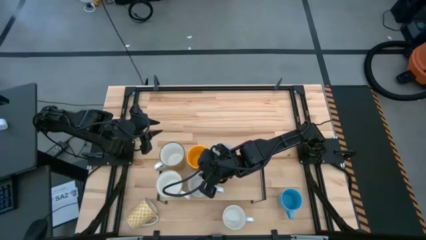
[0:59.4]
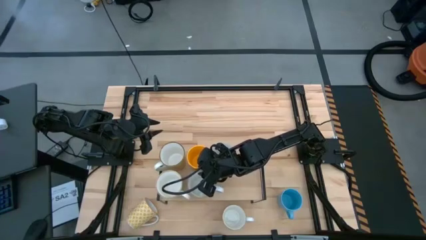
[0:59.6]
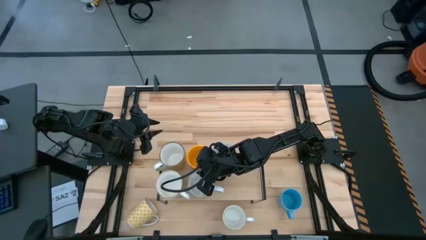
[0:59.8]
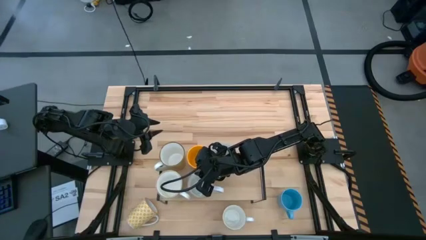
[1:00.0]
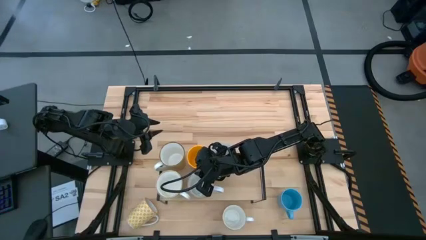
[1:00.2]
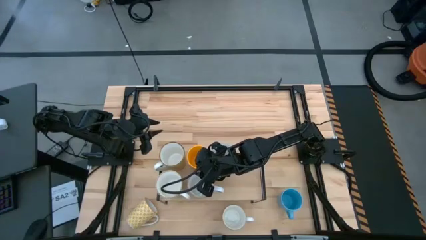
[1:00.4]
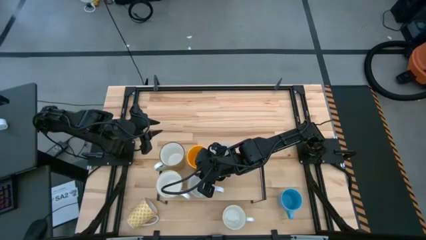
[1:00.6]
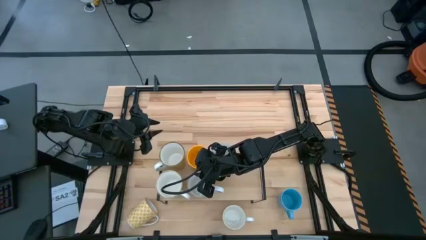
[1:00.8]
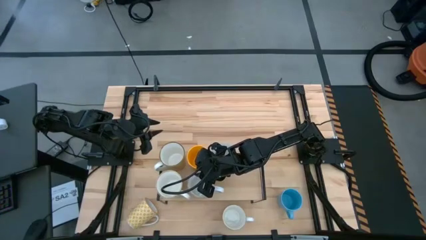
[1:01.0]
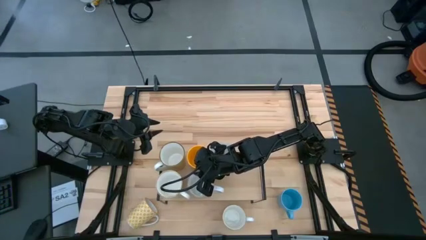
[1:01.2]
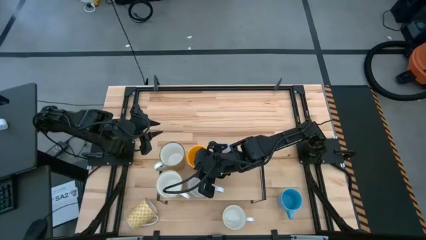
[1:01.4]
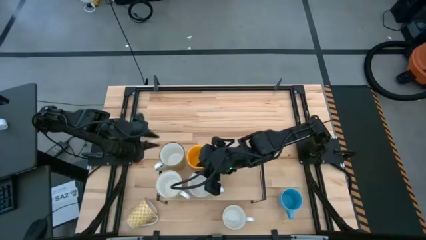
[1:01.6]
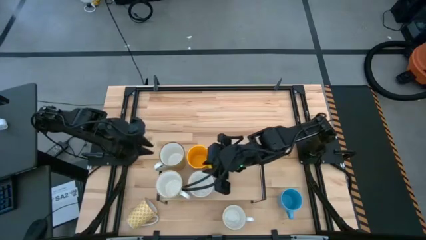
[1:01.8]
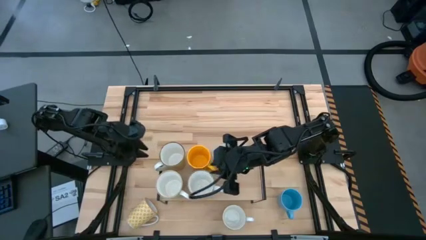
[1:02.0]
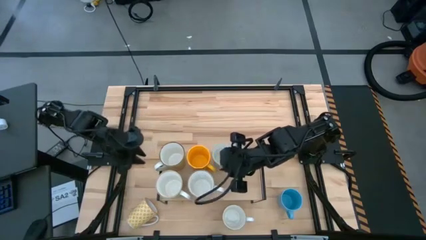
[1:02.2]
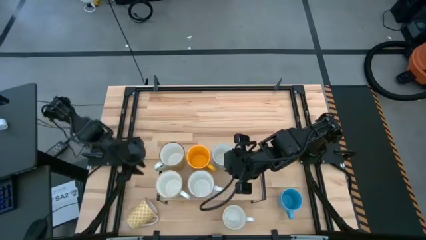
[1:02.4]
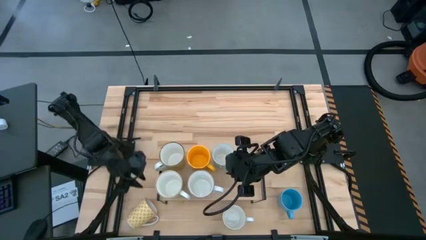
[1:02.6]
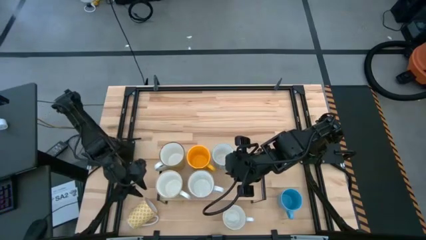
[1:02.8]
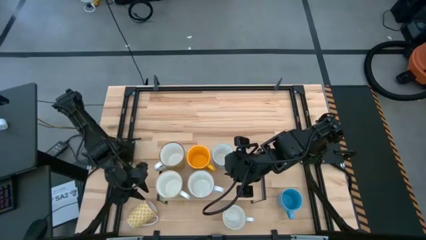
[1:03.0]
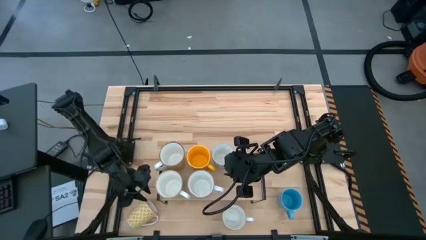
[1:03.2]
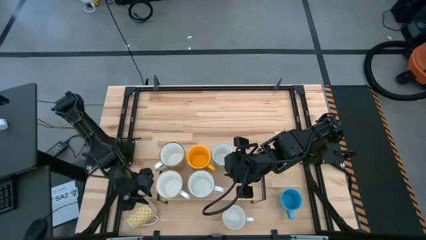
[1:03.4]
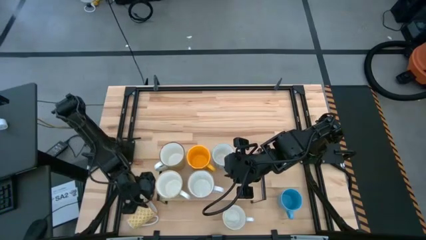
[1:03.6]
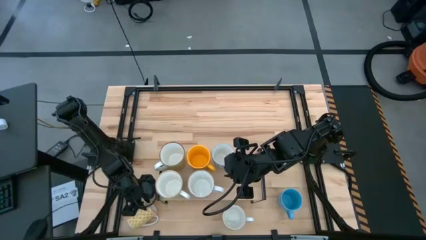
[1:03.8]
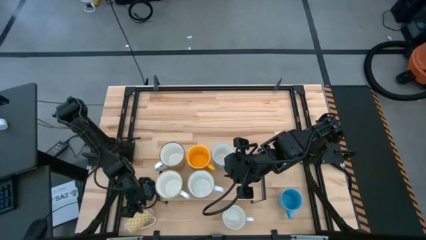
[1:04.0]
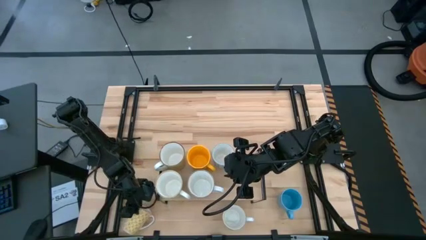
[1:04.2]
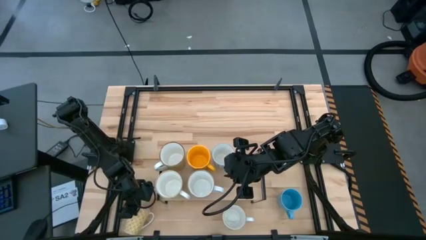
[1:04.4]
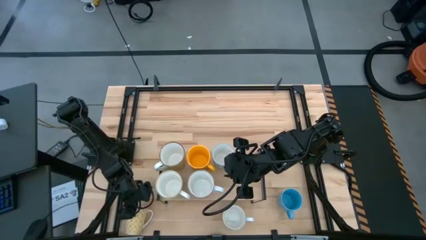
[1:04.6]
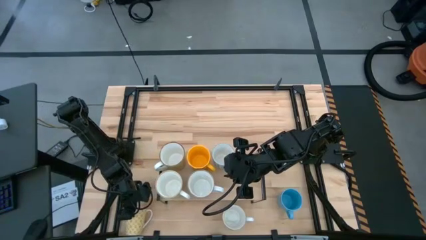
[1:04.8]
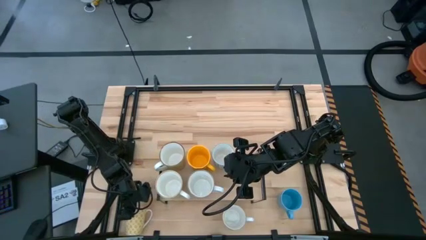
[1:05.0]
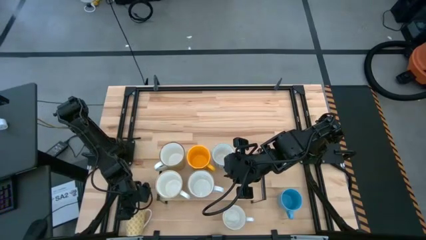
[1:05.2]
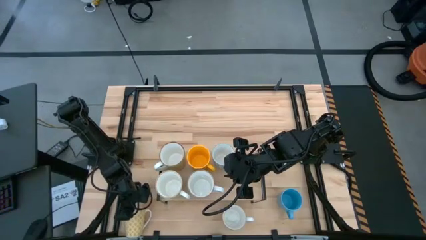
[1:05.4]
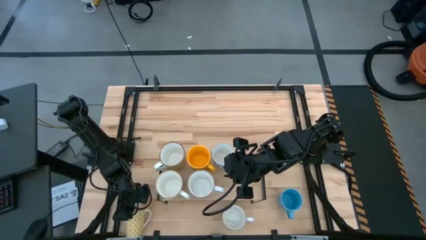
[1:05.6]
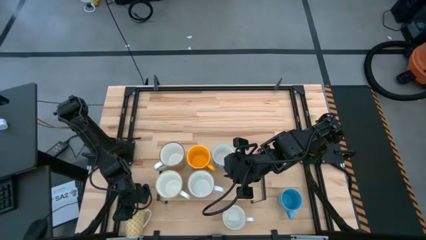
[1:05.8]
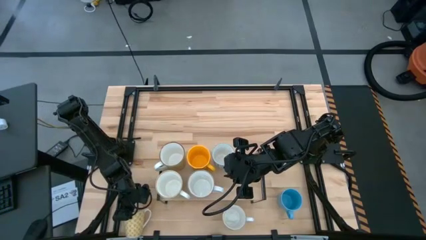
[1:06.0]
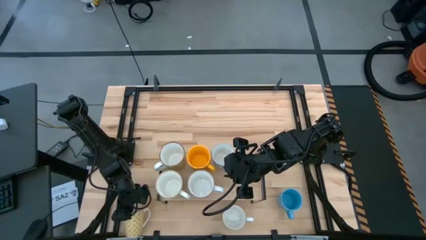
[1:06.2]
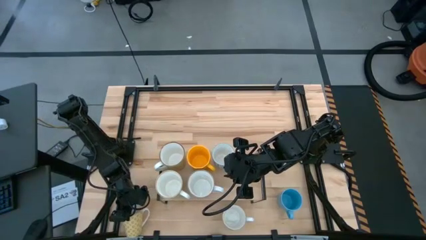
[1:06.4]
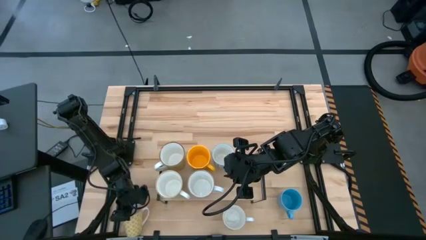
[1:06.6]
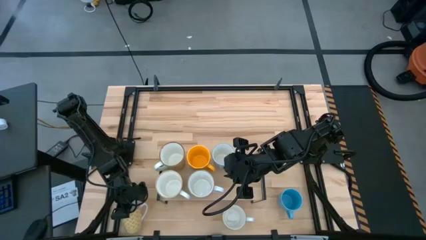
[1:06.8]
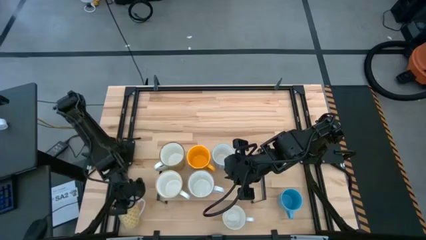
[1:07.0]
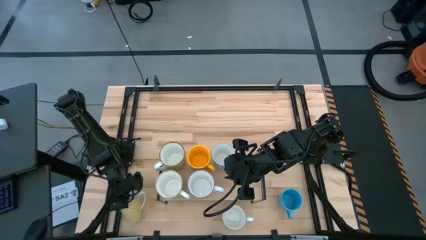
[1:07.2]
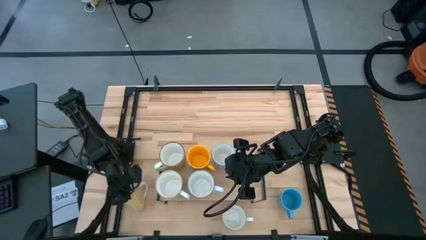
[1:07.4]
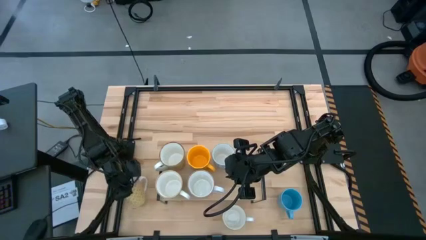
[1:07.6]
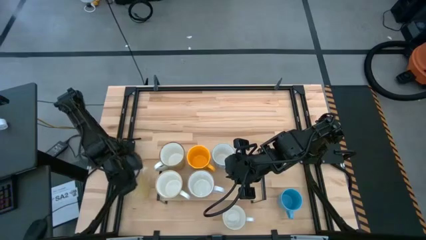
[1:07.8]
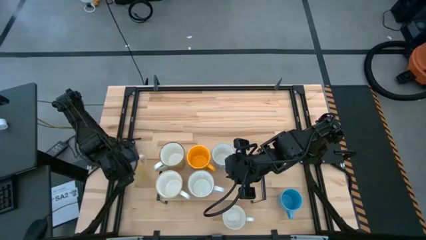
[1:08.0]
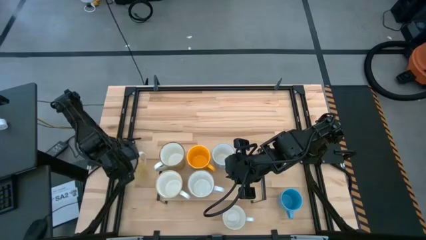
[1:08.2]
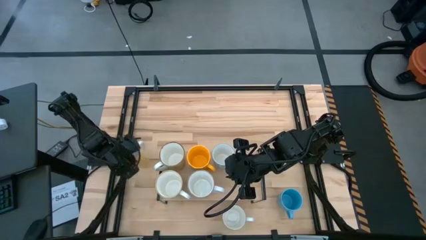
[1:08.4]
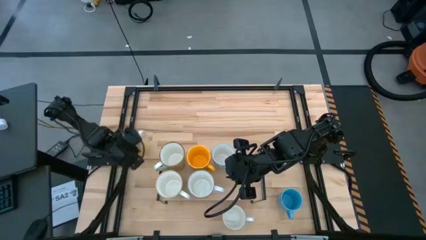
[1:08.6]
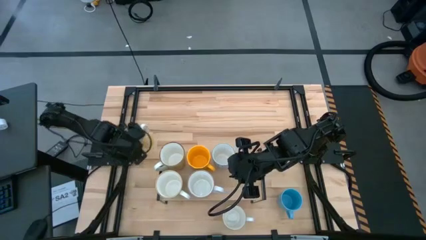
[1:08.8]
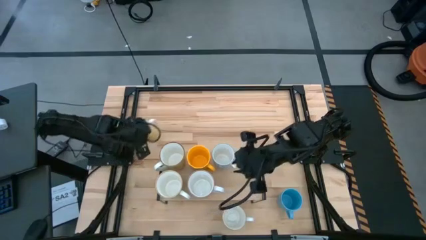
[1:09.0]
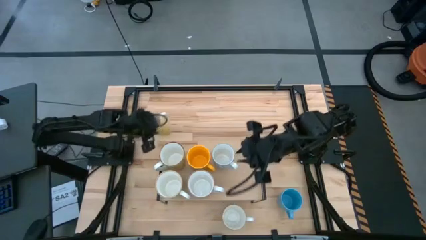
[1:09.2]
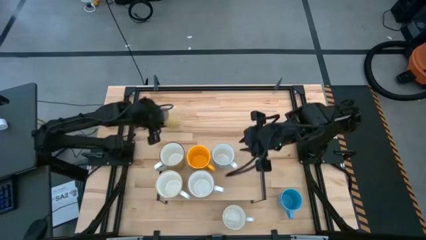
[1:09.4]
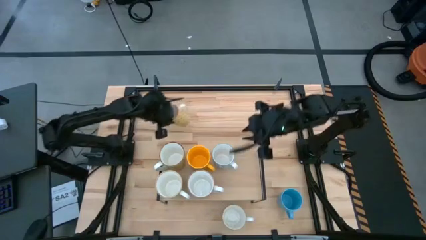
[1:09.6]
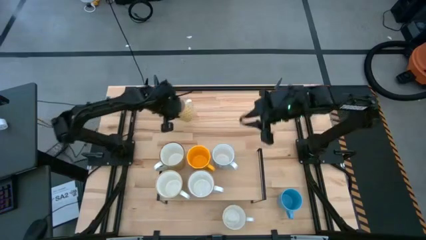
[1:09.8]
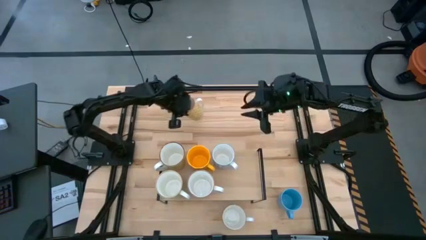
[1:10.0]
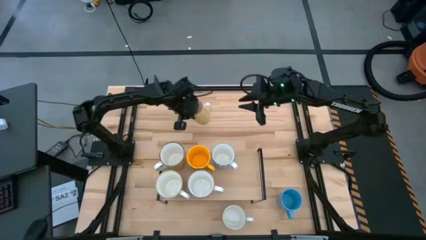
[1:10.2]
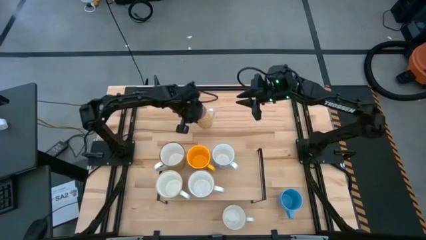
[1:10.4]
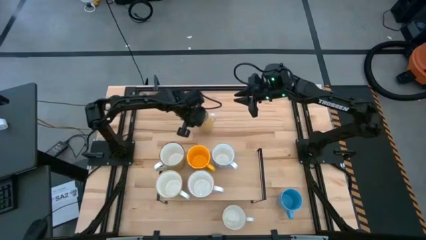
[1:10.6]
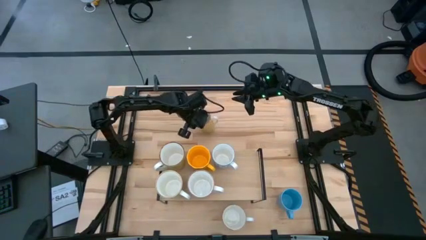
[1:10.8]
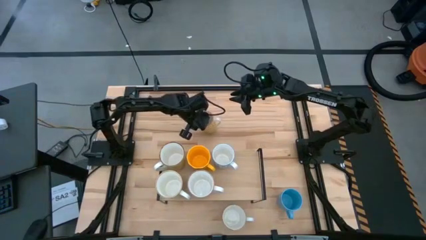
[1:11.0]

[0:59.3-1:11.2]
Task: Place coffee mugs
Put the yellow patterned mug on the shelf

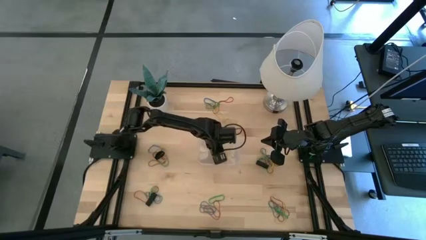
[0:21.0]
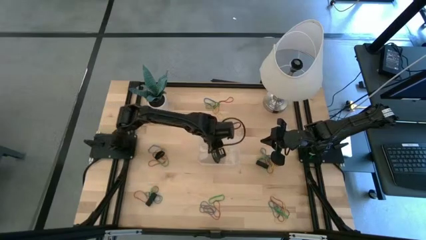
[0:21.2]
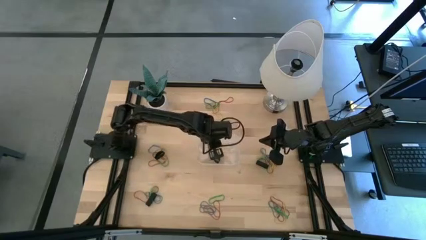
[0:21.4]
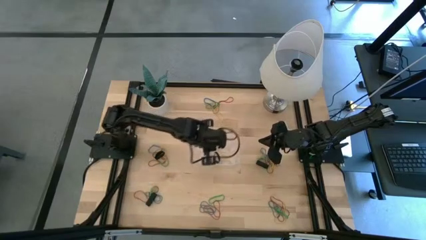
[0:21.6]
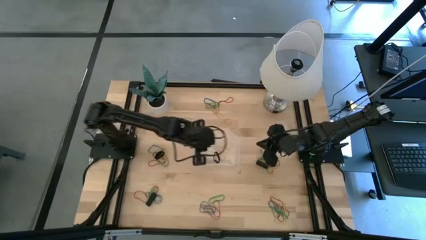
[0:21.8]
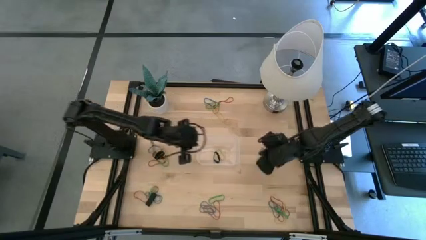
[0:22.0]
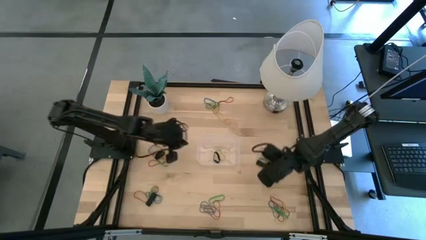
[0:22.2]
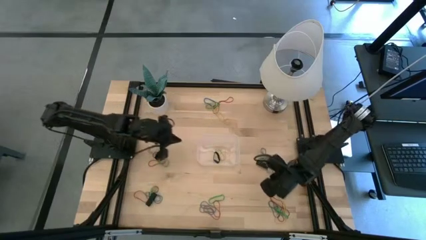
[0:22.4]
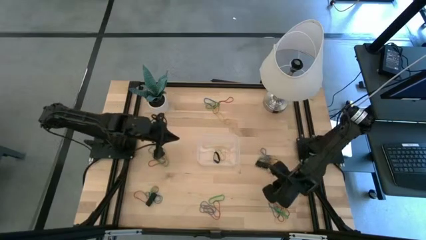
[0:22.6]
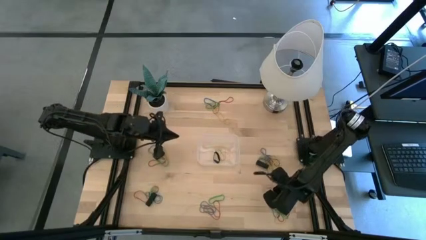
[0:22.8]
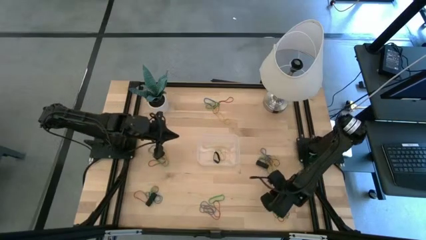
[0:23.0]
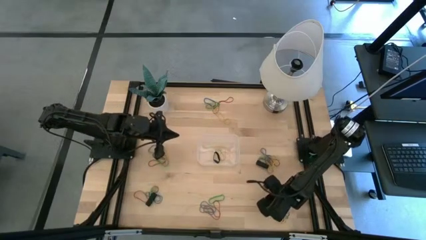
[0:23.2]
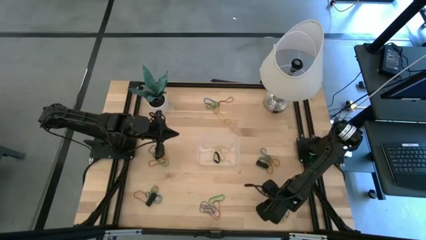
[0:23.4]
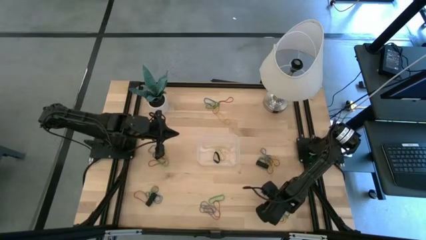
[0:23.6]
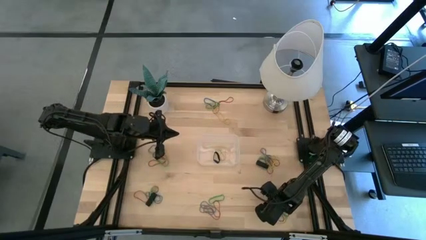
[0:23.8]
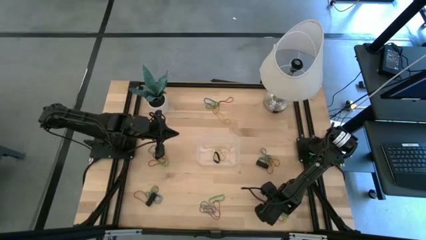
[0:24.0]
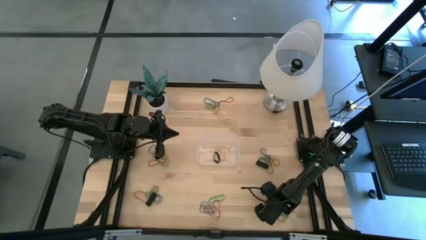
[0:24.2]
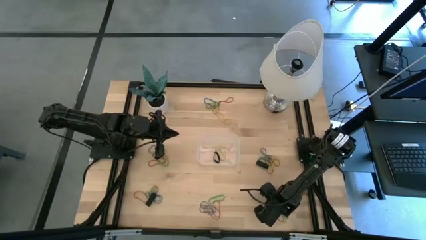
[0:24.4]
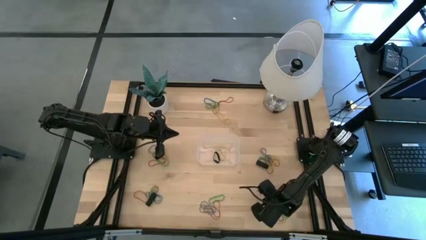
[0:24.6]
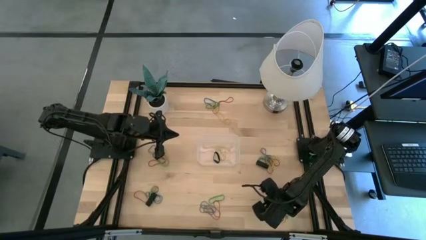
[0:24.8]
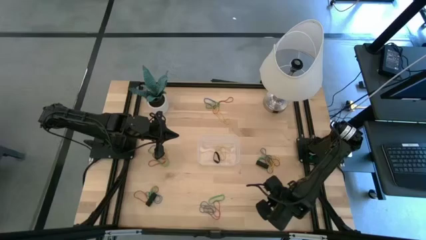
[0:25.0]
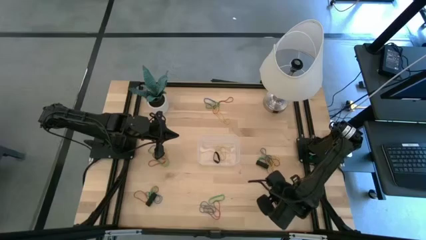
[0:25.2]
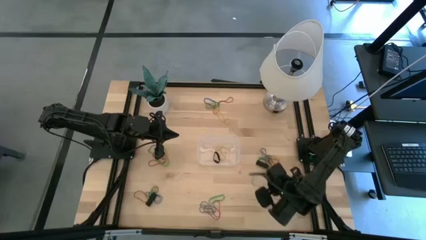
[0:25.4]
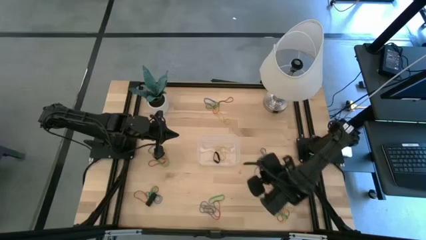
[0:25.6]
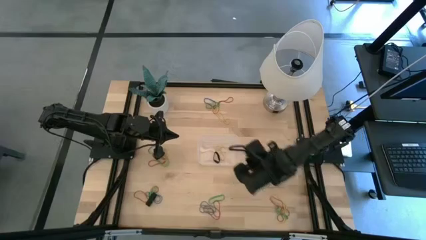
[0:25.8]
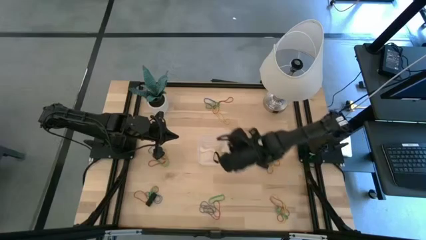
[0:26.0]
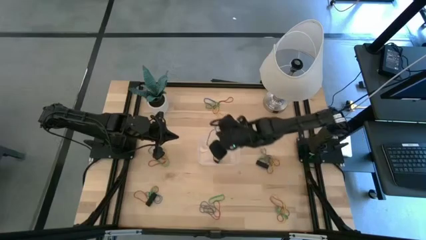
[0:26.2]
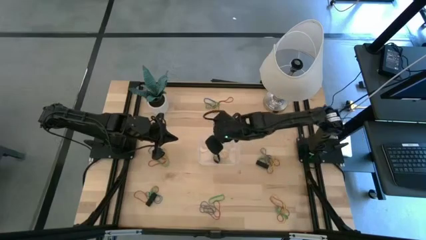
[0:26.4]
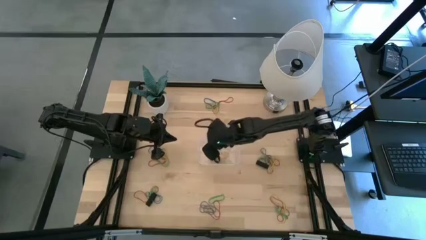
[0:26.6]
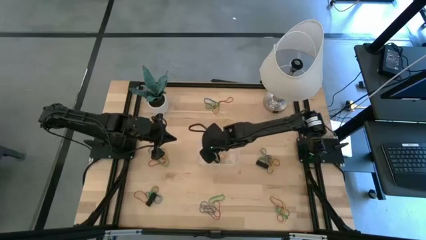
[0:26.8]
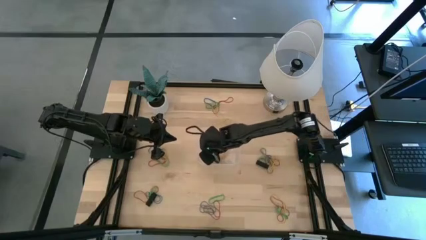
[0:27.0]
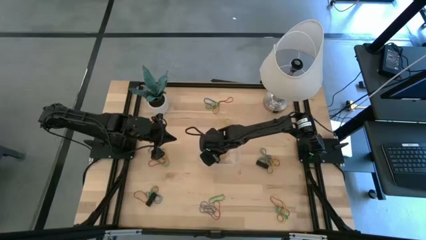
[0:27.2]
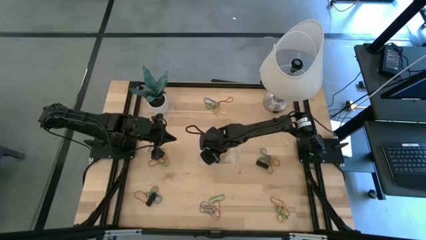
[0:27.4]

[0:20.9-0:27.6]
Task: Pick and place rubber bands into bin
Put the blue rubber band into the transparent bin
